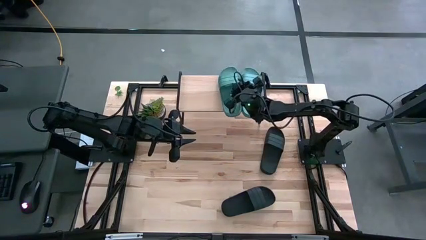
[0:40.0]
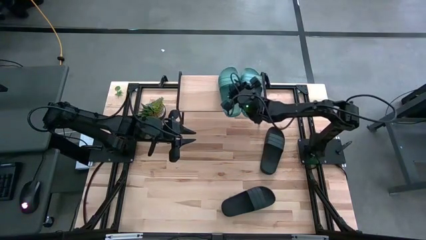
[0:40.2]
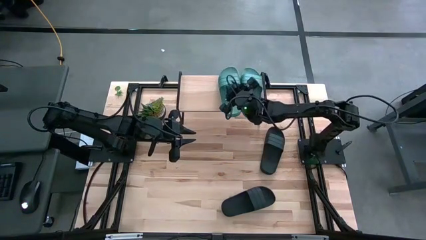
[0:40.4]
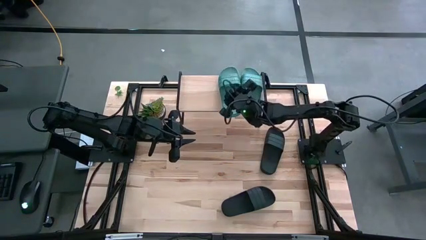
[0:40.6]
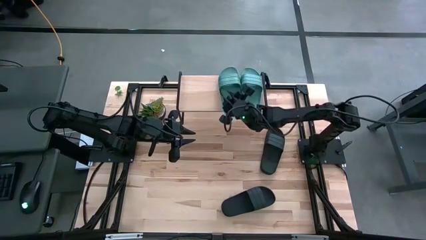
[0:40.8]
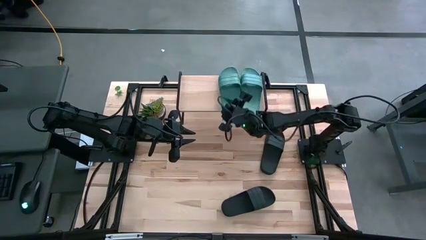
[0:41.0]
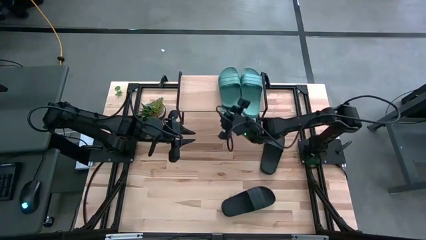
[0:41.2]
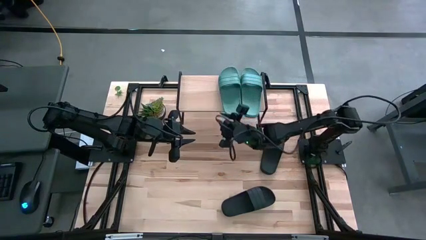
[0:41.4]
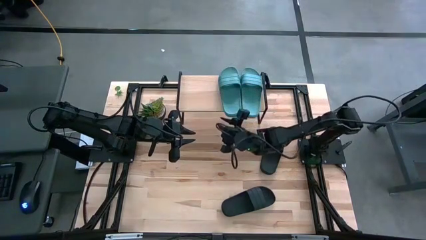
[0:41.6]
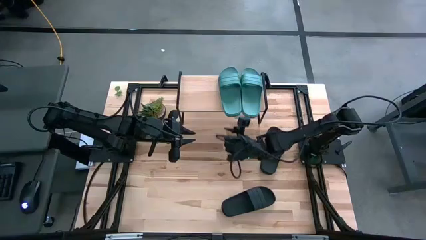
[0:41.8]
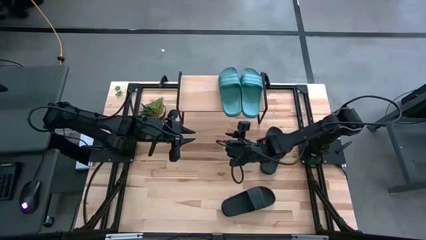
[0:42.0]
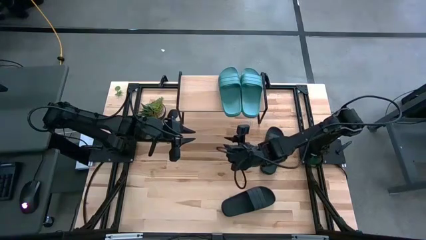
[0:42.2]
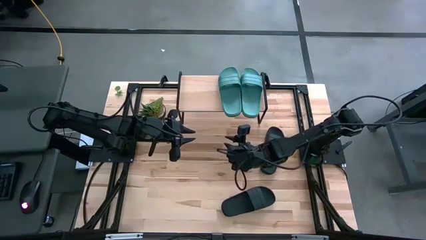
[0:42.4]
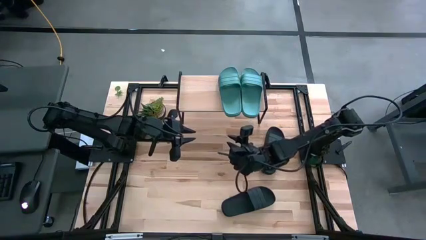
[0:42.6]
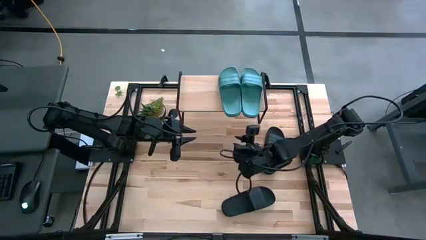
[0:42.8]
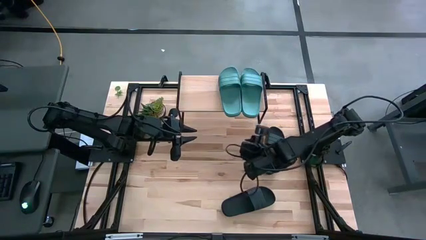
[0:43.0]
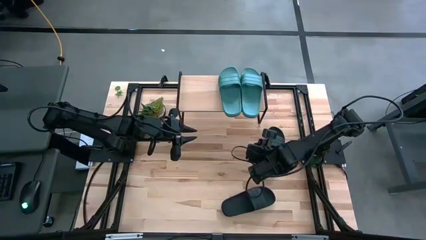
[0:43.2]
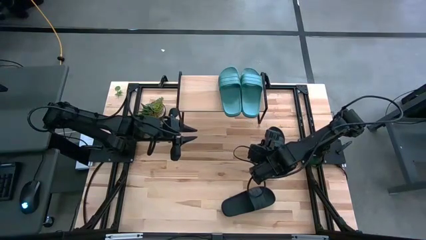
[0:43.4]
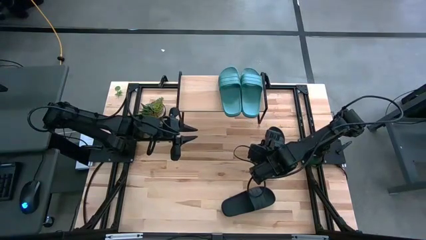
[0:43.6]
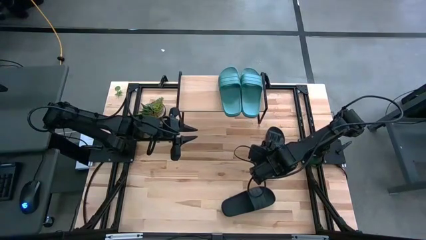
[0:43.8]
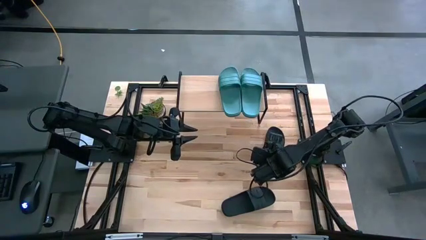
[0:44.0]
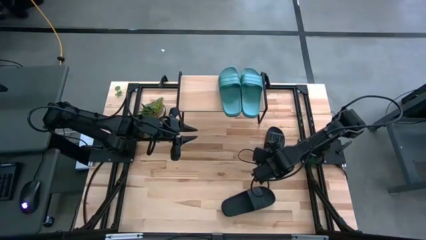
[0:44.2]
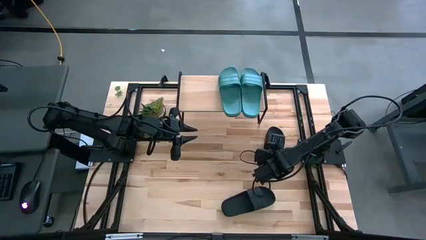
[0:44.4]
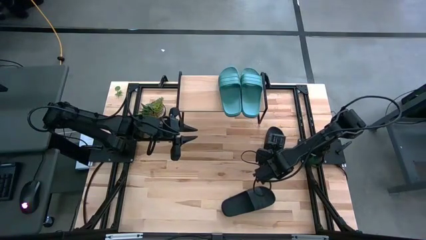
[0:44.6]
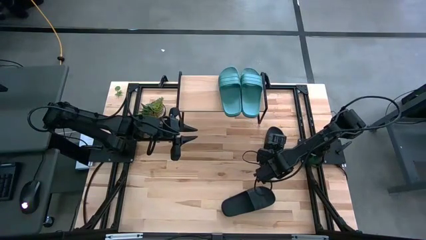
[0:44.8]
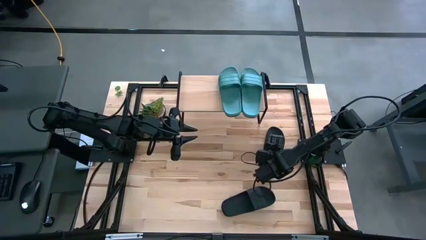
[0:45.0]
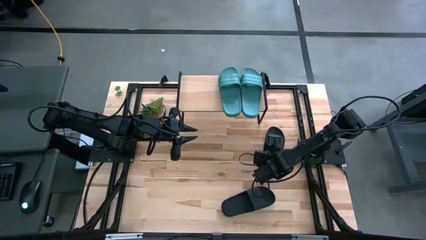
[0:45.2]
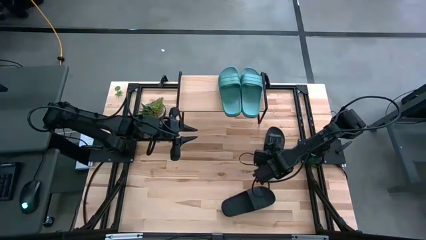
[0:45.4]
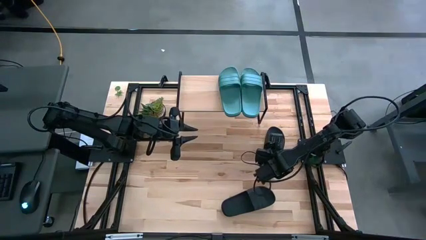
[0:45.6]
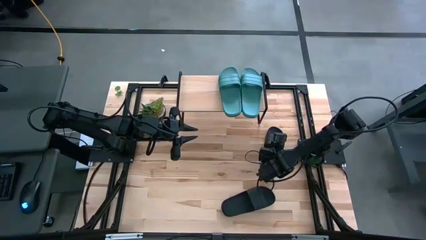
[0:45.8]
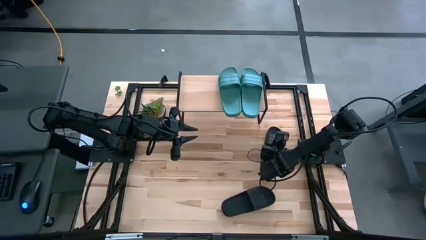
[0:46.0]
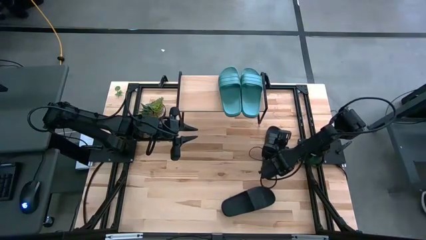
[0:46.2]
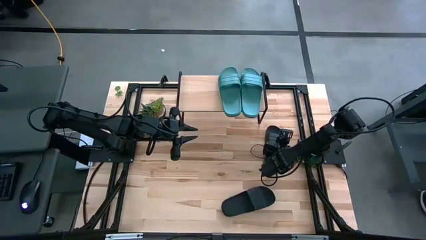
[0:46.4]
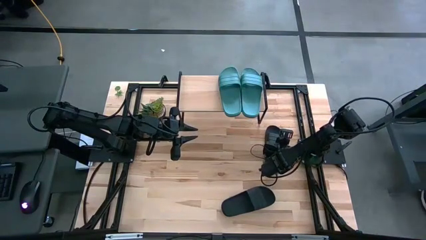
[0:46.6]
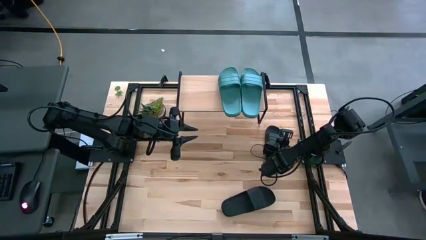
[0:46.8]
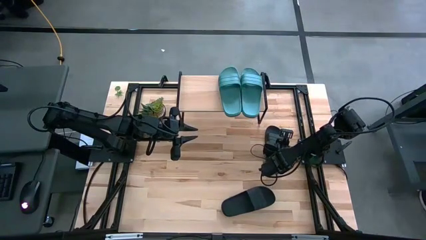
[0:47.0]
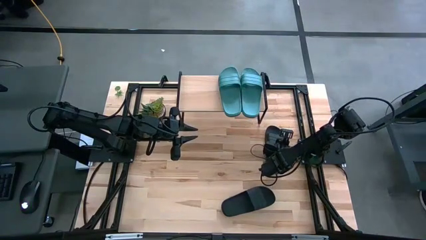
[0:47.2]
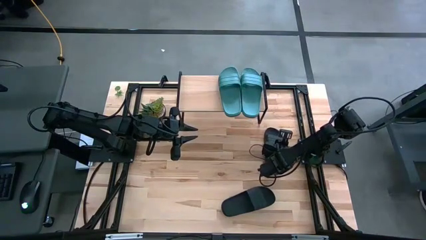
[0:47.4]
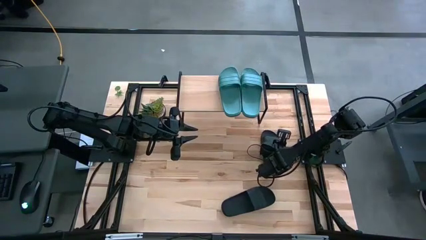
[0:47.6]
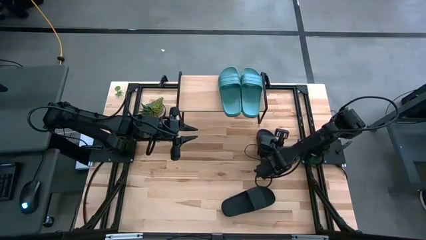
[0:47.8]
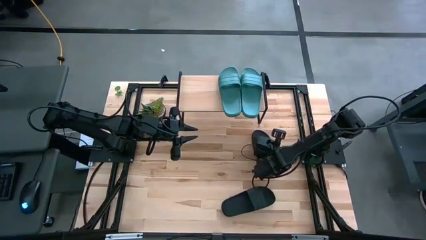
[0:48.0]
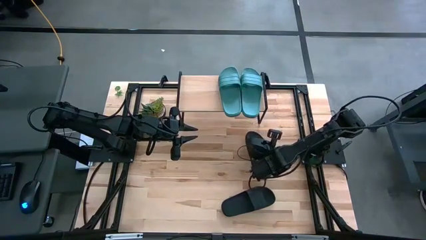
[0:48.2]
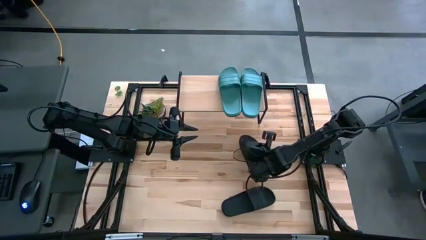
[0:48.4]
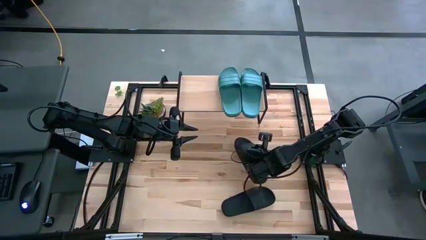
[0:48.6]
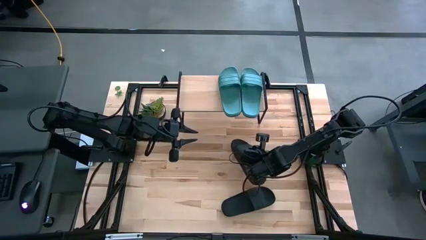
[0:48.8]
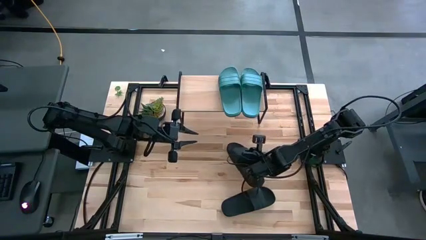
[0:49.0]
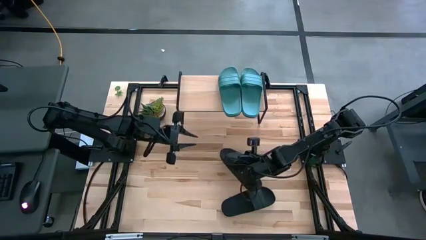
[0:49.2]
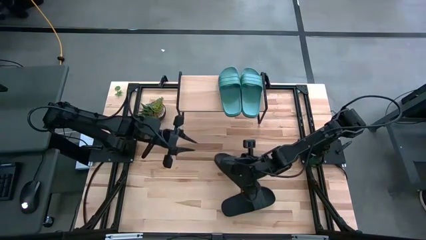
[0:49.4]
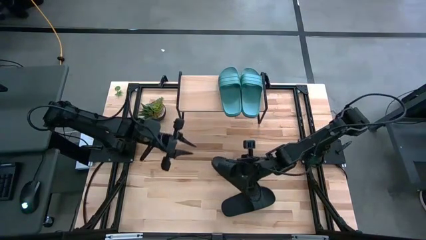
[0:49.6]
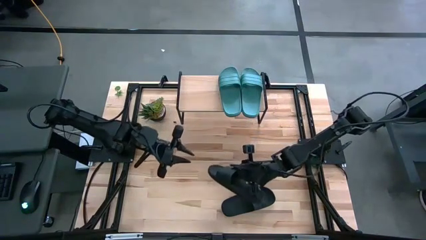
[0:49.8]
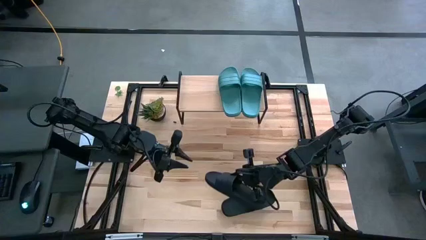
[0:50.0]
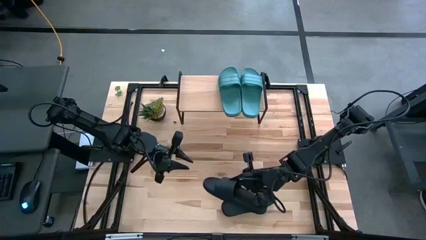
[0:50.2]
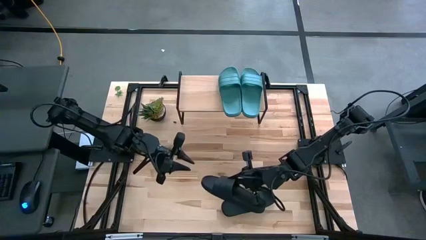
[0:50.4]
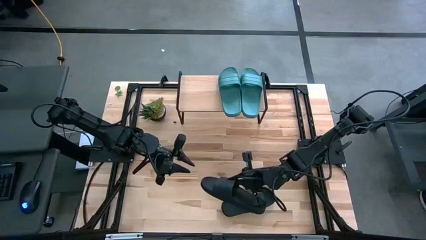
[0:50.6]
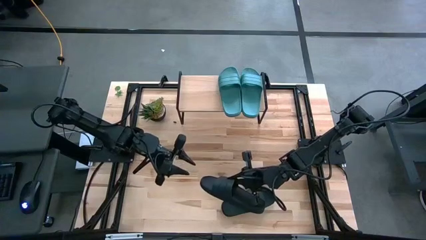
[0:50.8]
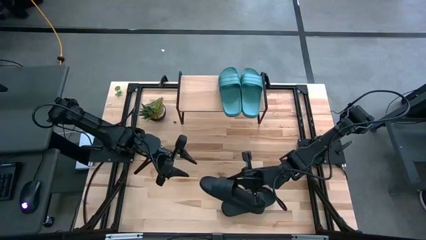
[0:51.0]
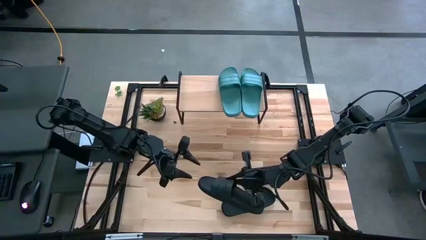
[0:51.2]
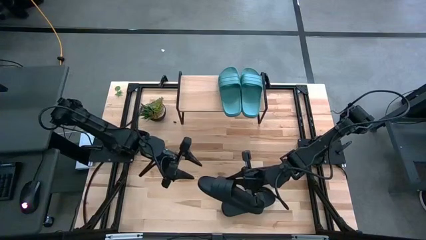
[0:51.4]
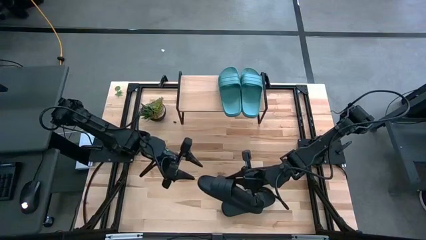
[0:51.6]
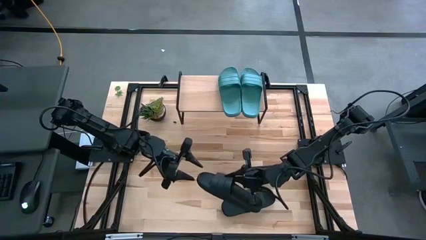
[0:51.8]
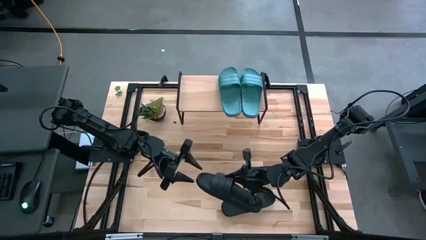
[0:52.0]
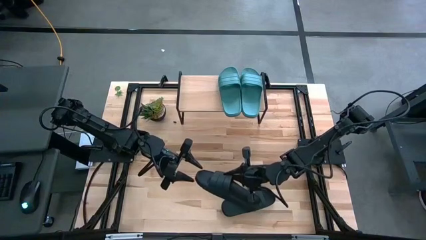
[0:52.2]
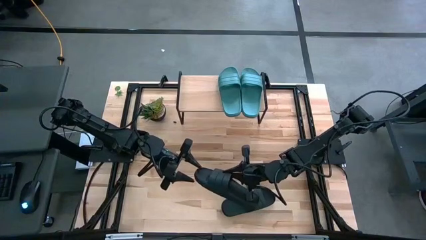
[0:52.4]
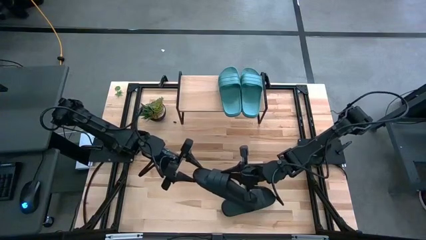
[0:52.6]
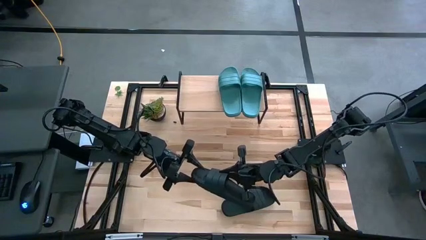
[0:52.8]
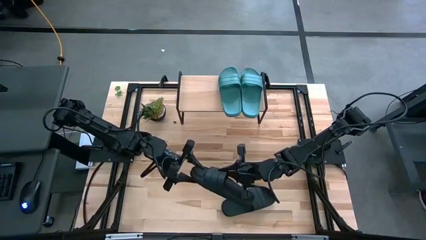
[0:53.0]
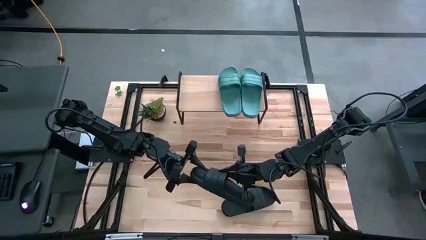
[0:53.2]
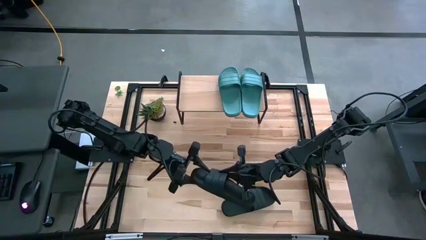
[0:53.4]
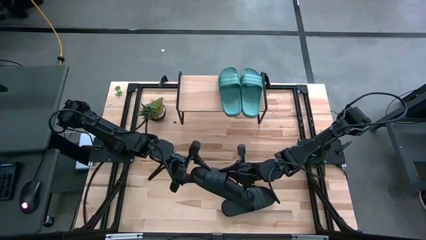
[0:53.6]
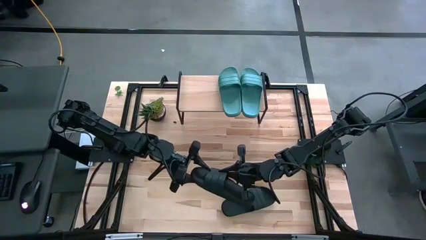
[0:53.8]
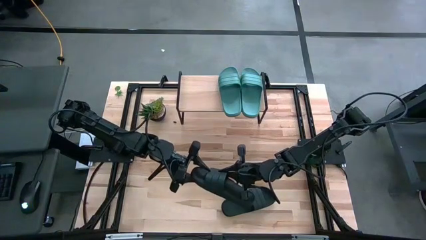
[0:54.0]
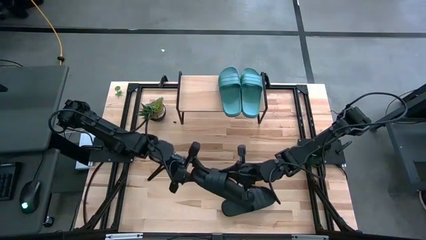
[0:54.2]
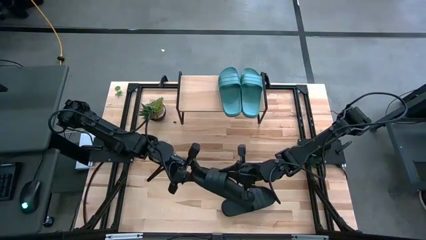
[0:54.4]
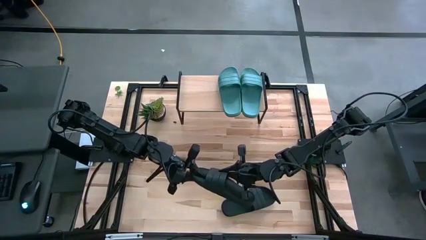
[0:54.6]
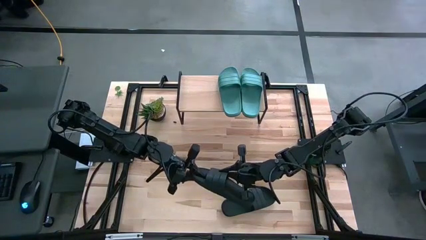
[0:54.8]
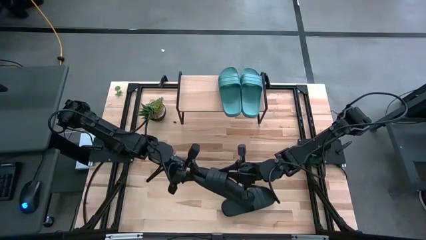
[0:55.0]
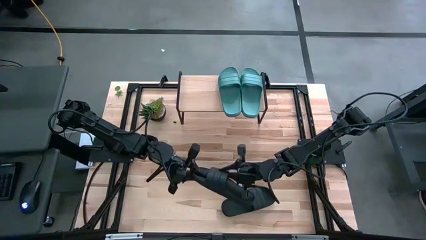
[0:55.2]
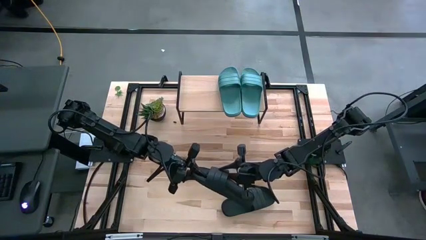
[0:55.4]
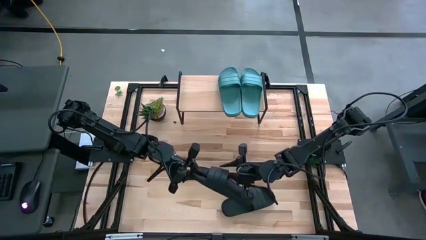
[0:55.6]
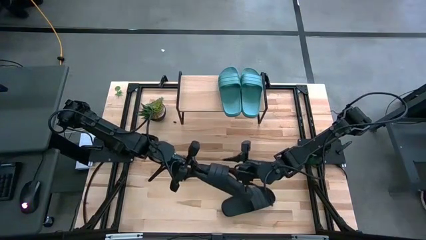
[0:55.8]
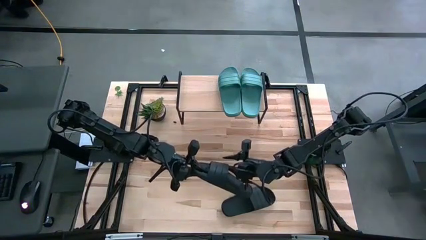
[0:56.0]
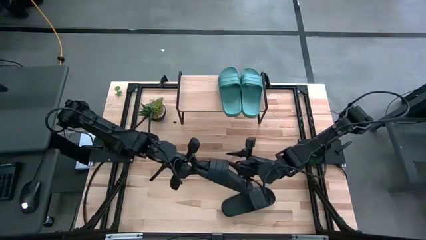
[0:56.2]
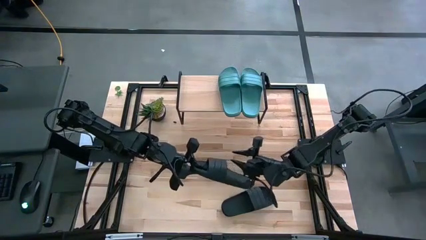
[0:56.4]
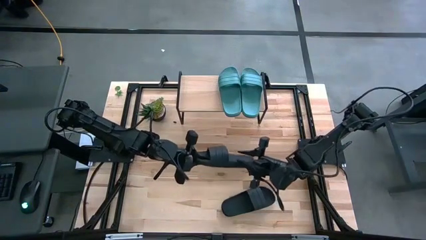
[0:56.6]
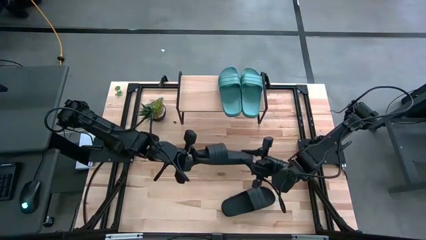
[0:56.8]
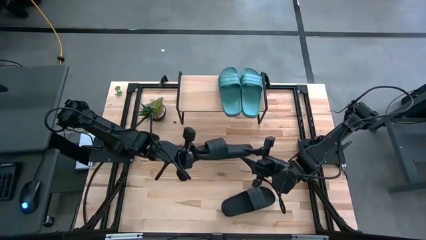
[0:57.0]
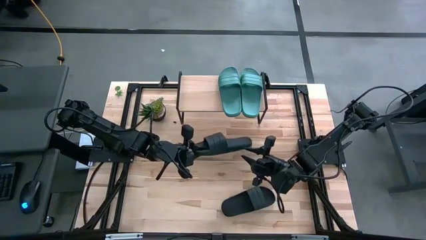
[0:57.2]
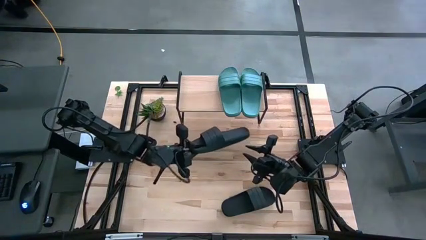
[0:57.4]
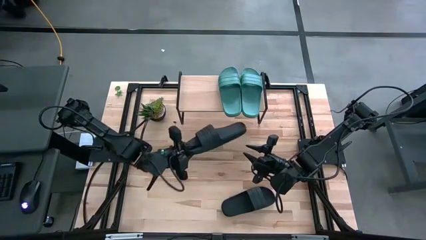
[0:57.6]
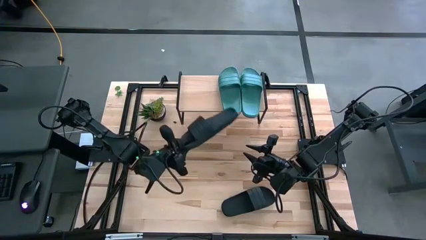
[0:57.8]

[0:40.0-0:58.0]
Task: Pick and place slides into the shelf
Put the top black slide on the shelf
